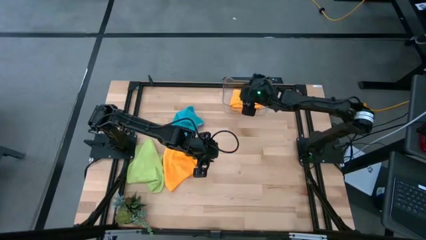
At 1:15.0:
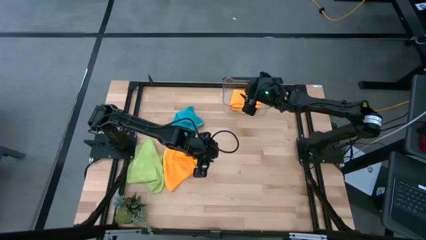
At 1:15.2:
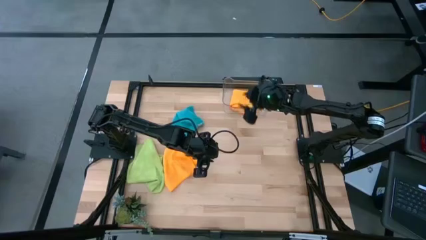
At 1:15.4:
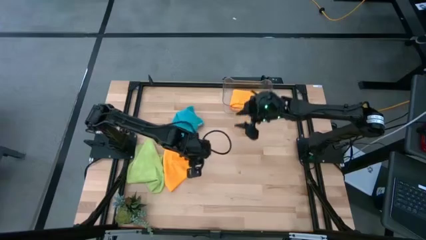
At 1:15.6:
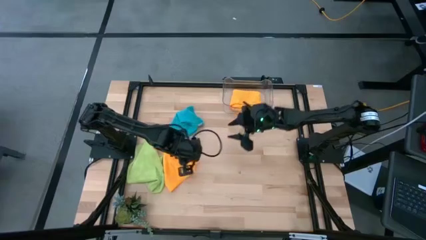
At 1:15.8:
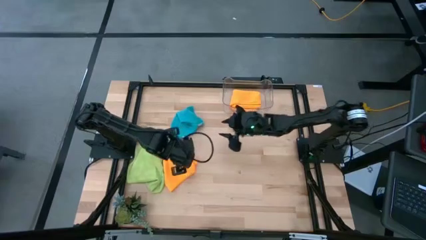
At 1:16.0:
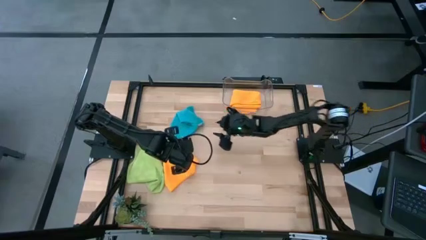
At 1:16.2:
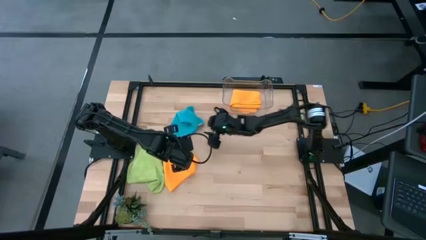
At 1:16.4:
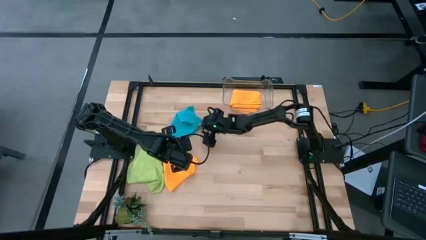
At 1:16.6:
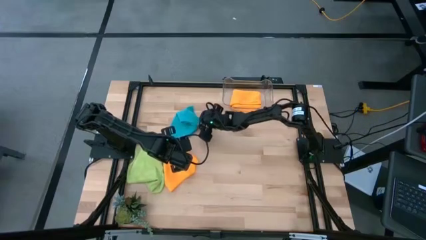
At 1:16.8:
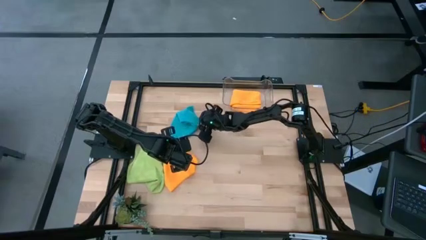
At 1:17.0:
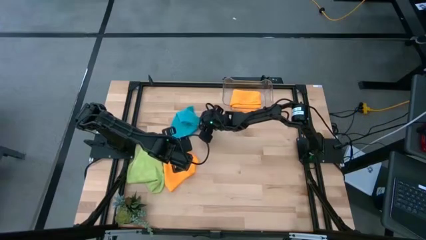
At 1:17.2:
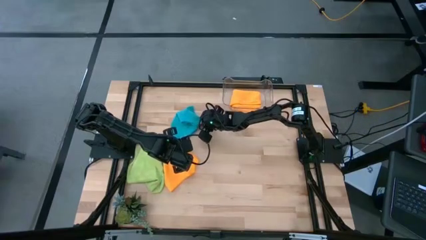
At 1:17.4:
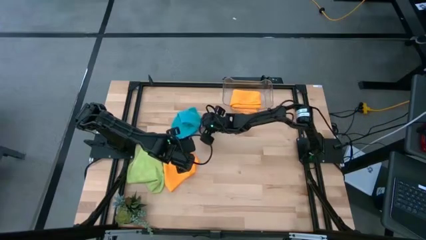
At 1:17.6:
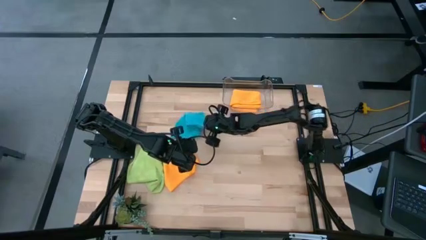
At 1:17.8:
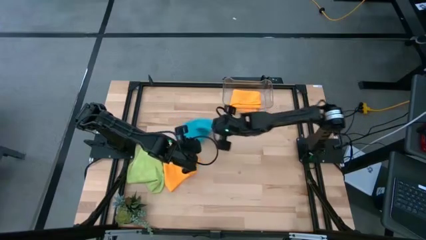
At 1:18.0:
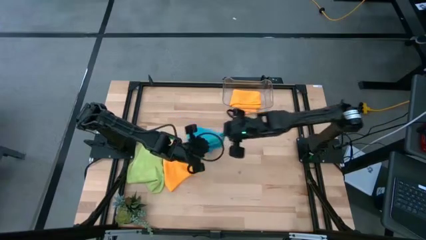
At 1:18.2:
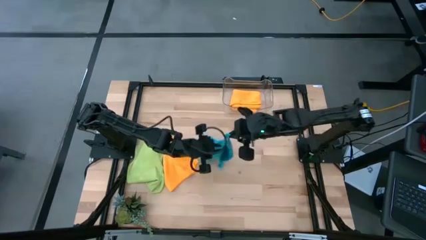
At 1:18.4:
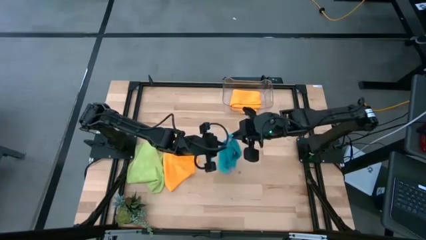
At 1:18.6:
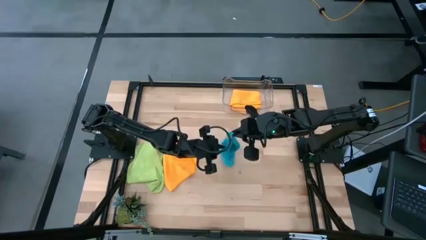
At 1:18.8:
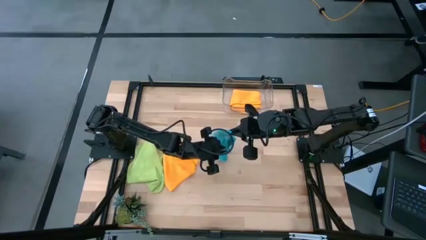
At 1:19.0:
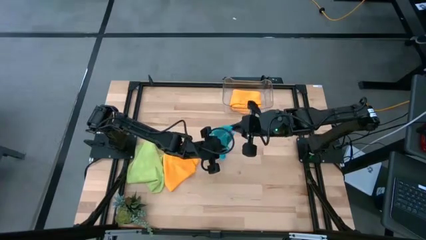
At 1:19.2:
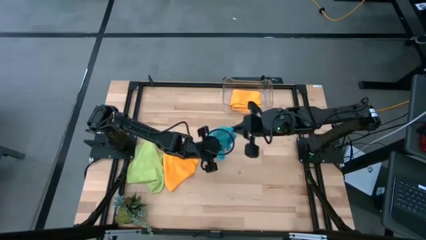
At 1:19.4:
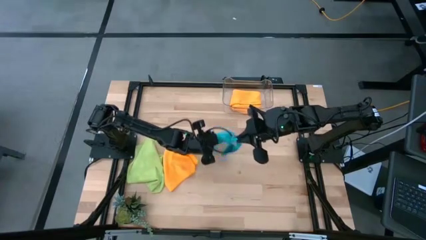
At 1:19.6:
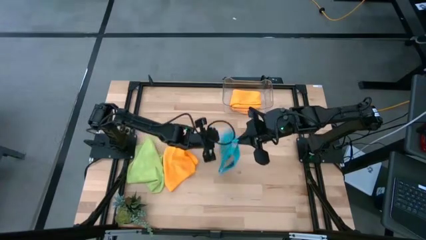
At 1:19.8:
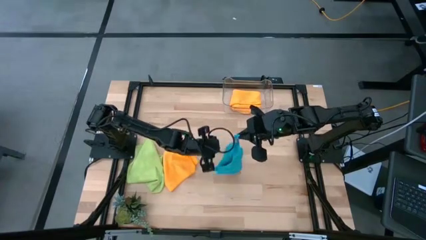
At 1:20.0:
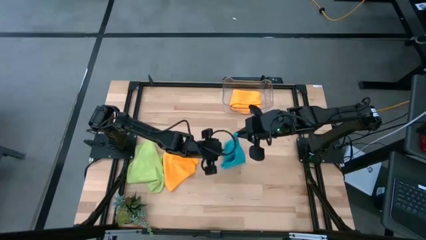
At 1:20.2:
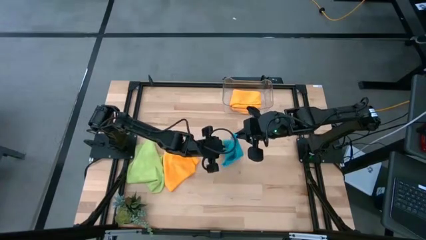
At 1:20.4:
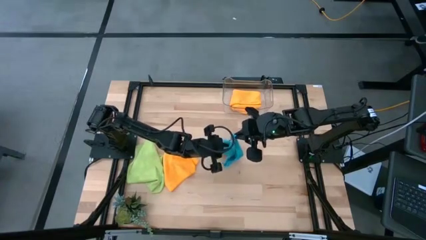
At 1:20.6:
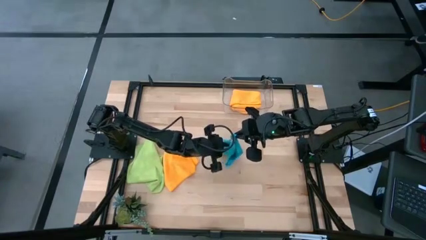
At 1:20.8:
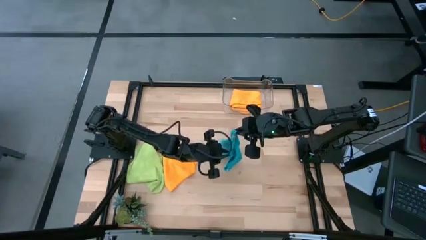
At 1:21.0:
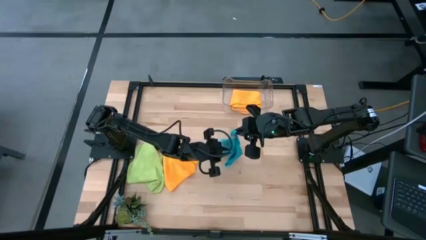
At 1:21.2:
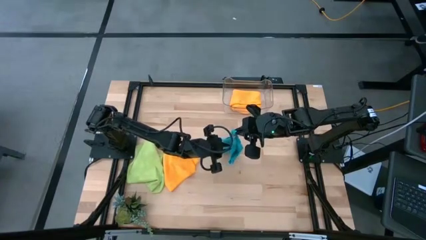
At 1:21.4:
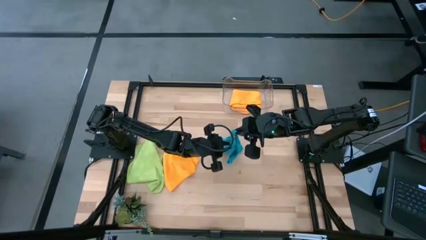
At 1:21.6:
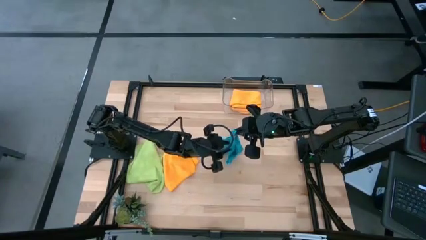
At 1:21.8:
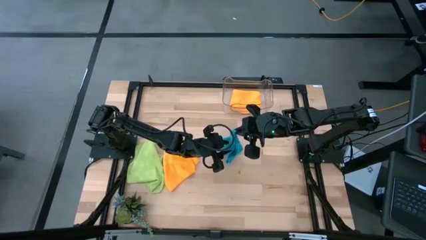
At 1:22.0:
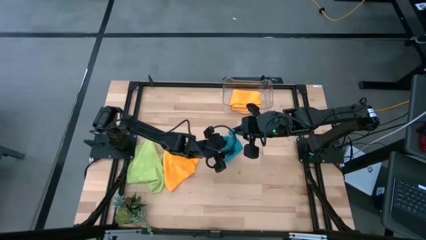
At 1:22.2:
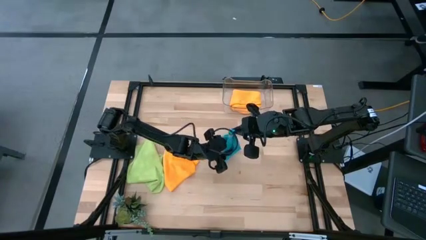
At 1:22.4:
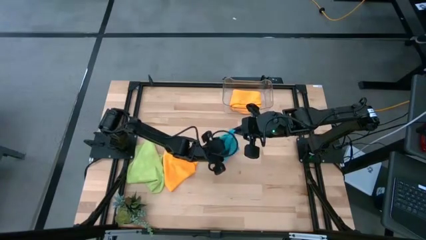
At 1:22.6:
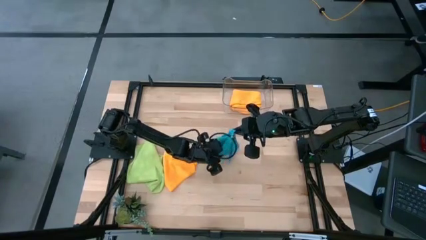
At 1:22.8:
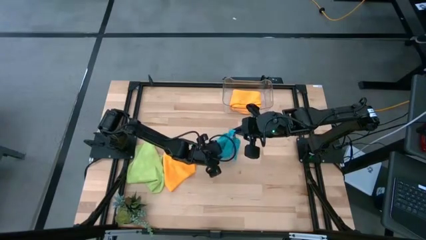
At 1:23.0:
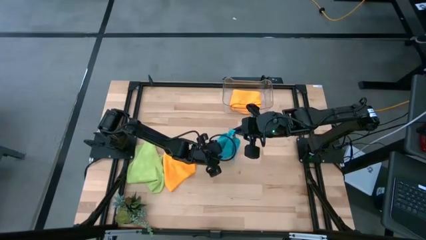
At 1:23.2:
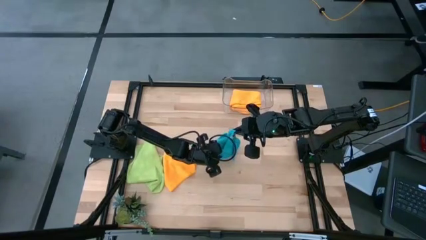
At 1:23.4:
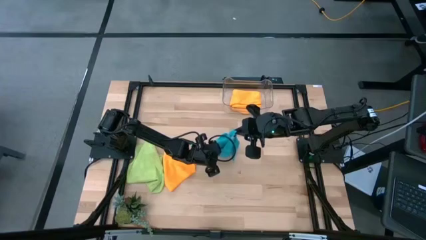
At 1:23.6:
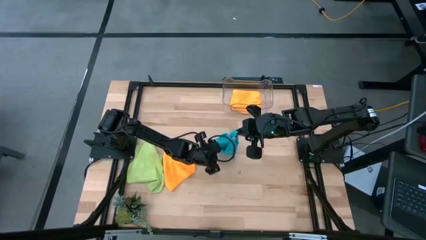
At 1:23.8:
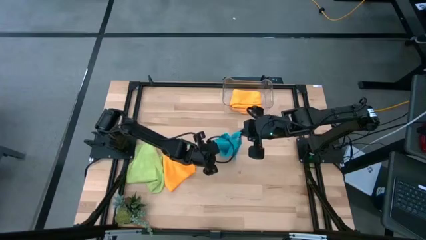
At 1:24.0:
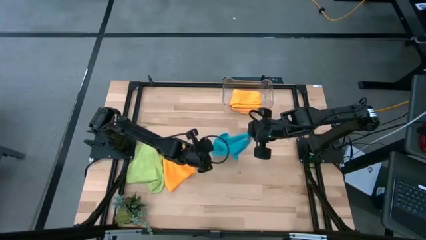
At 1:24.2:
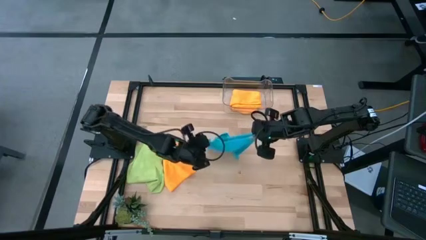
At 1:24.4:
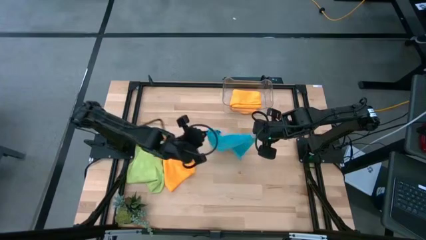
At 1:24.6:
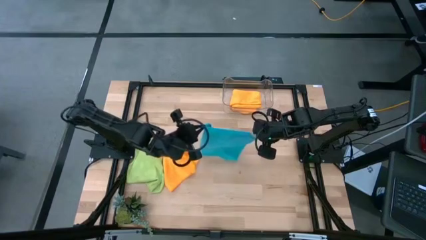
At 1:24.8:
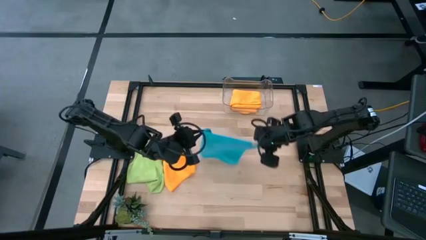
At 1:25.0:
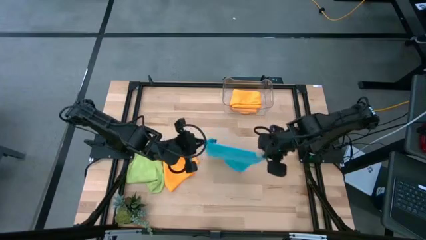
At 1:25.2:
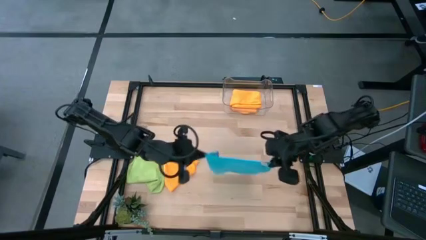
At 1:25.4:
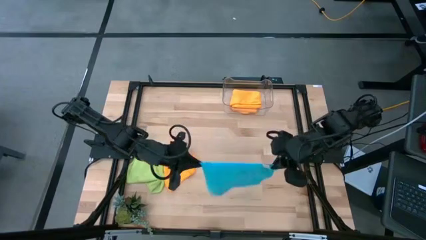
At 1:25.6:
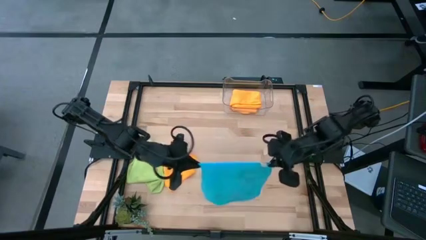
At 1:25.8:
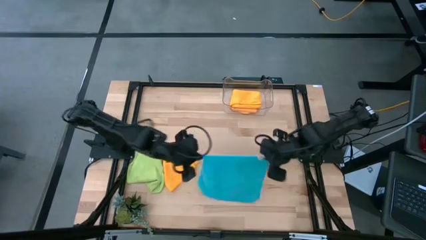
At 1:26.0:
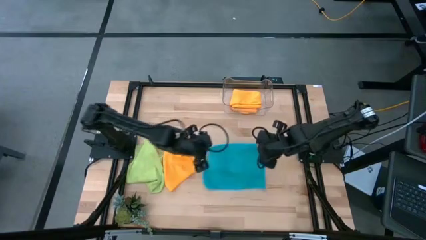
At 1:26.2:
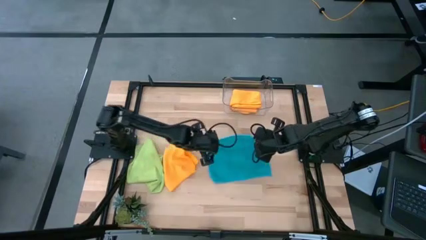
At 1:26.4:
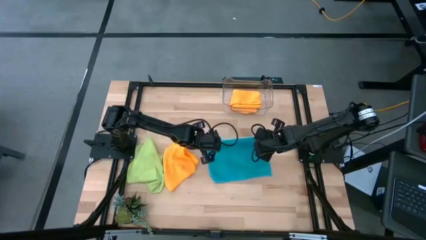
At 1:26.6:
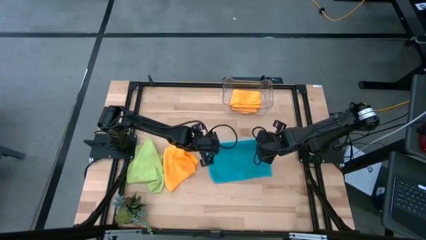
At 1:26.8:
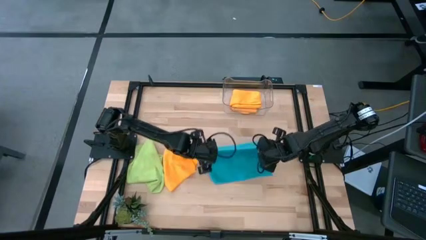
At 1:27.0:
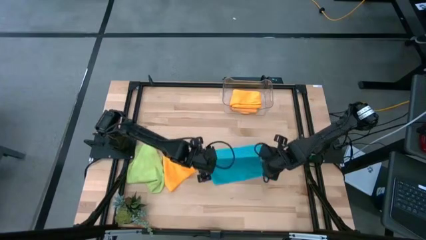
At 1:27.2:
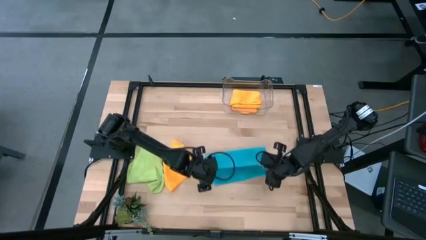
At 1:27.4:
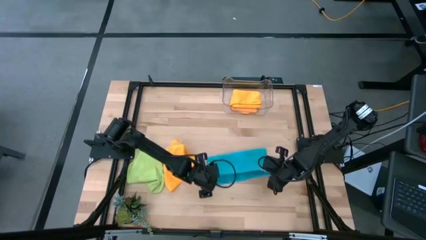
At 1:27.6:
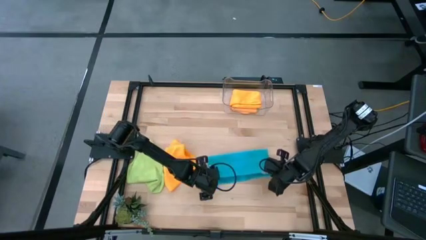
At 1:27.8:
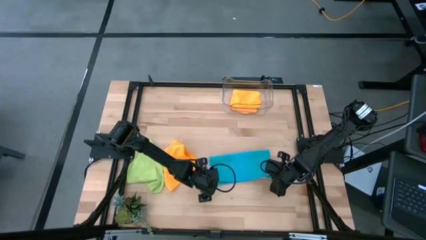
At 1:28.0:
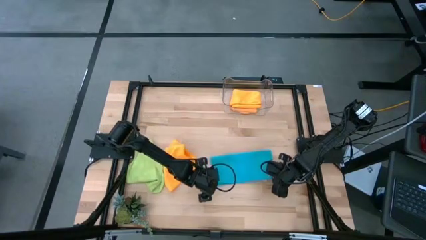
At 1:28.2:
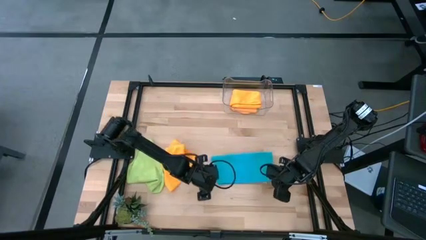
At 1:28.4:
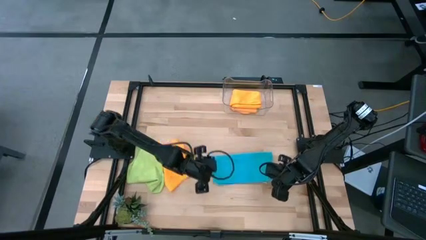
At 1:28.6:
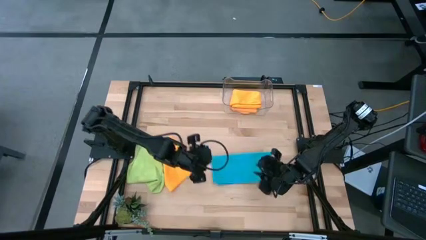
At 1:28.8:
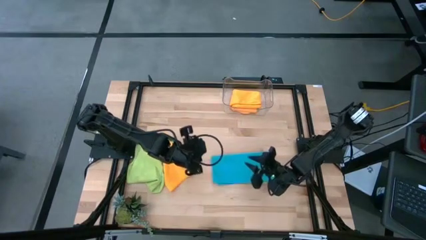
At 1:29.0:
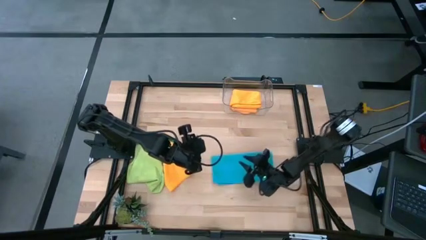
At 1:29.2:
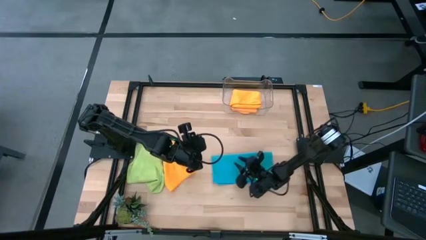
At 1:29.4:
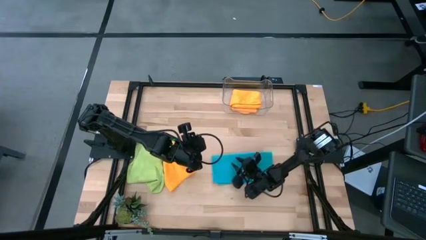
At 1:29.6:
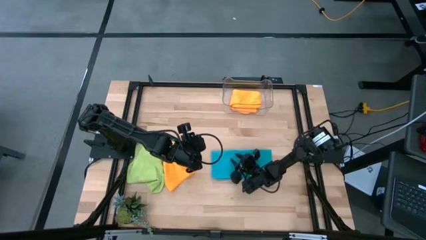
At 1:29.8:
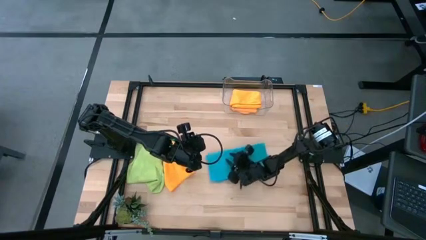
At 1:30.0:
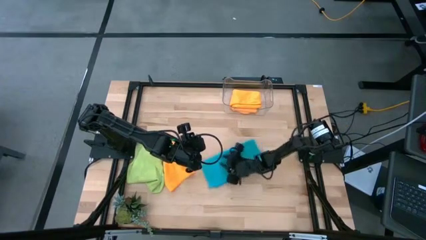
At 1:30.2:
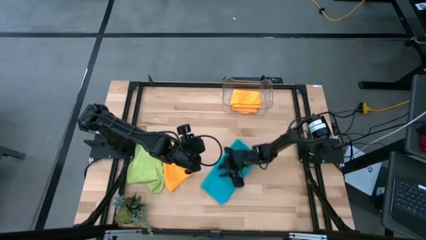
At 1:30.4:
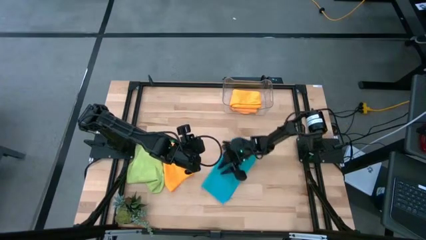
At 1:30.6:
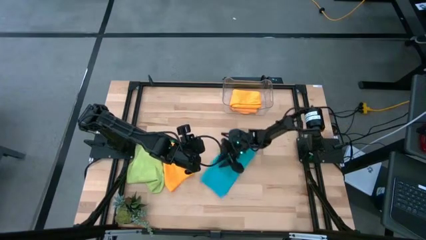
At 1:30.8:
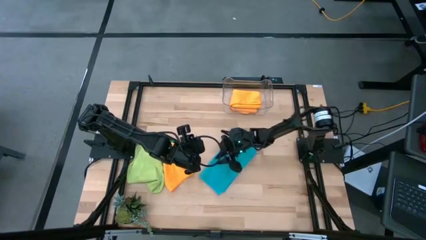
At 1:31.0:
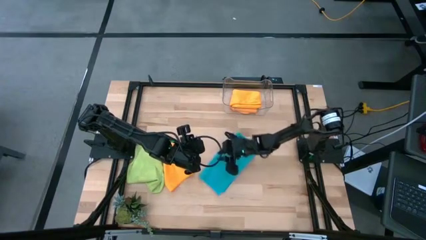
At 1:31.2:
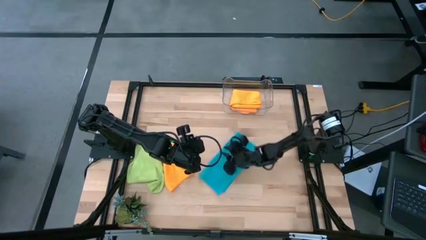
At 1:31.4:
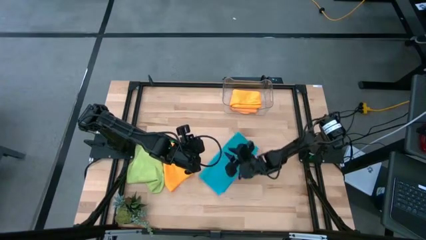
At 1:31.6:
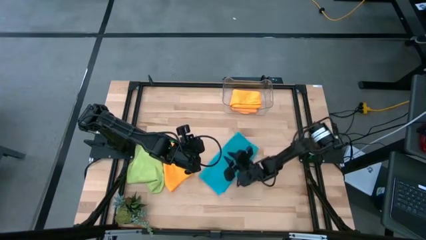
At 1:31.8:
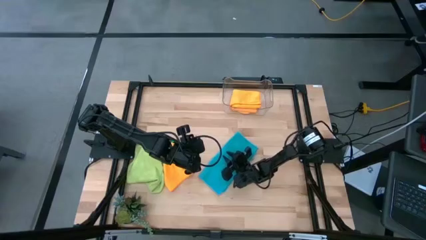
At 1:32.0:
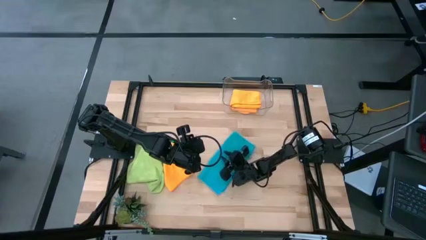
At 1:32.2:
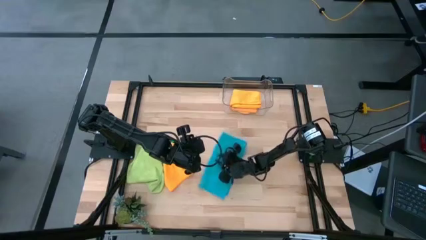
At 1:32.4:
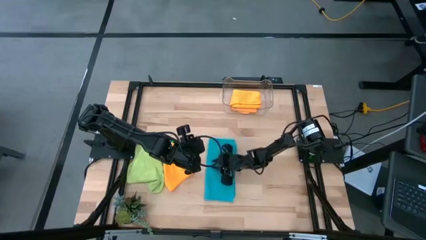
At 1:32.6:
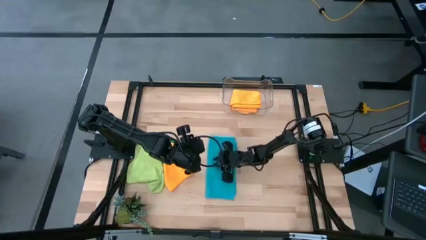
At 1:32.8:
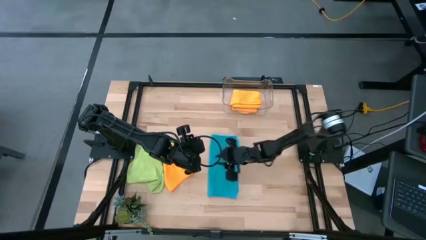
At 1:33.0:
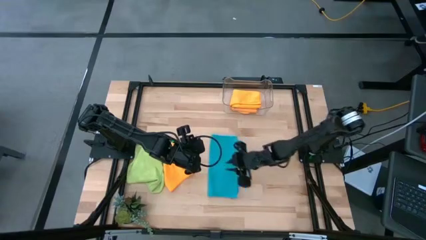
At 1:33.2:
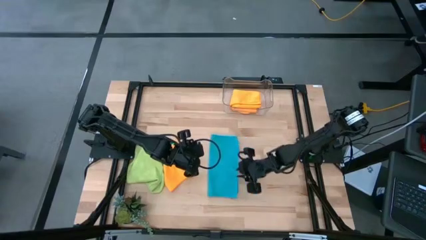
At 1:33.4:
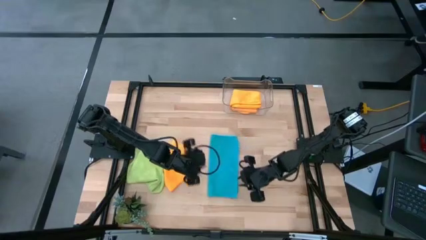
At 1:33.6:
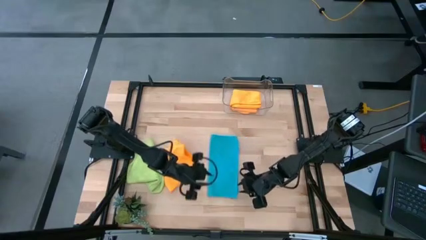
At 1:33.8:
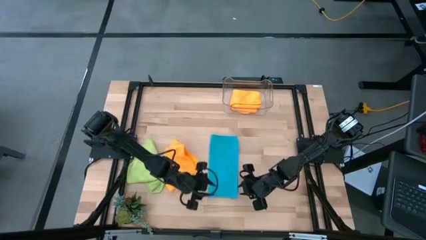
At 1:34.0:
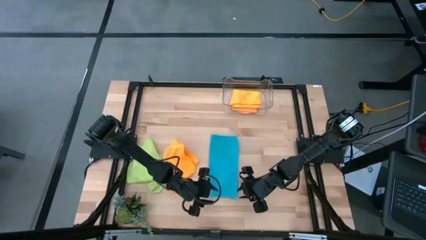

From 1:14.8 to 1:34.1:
Task: Fold microfiber towels
Fold the blue microfiber towel
